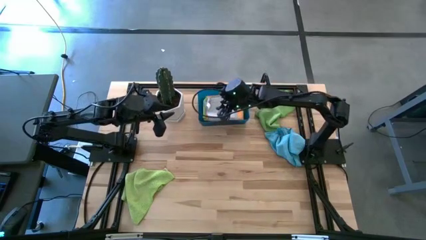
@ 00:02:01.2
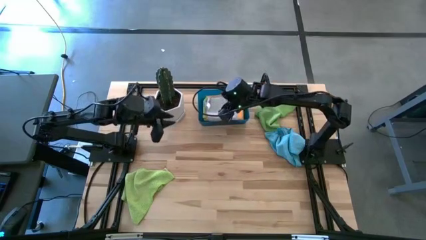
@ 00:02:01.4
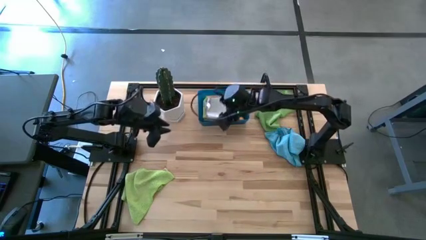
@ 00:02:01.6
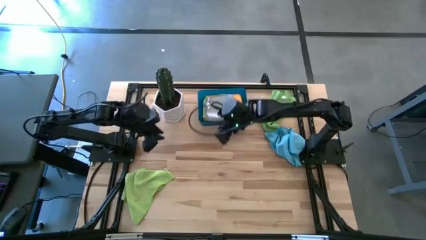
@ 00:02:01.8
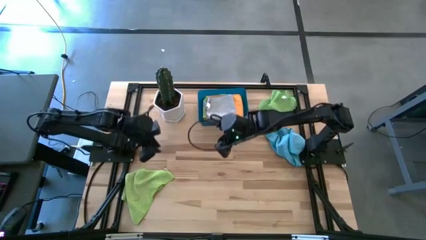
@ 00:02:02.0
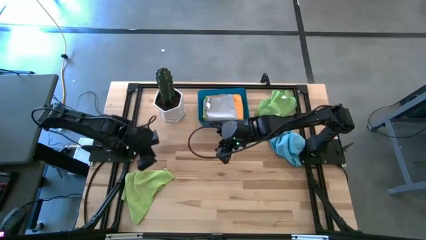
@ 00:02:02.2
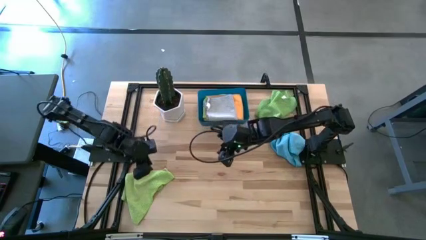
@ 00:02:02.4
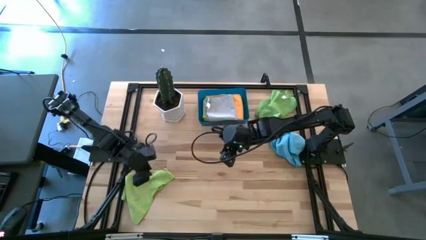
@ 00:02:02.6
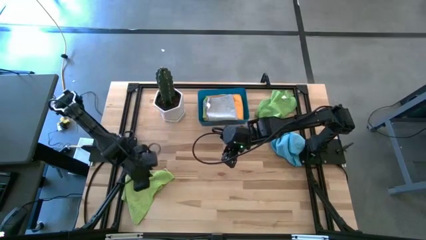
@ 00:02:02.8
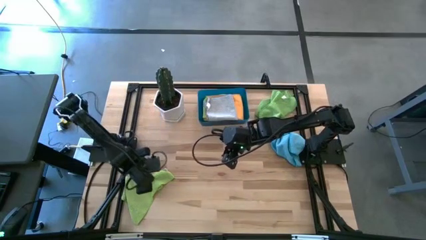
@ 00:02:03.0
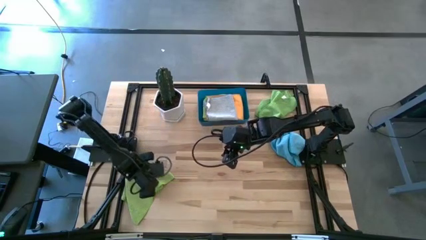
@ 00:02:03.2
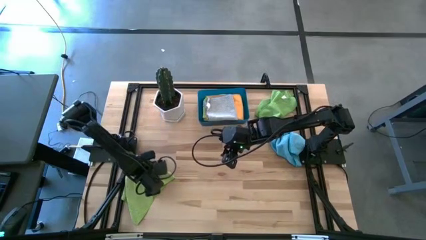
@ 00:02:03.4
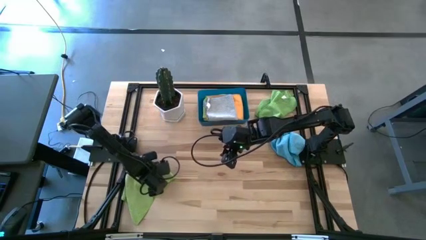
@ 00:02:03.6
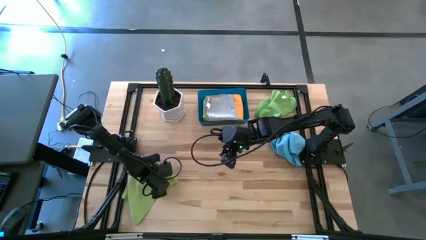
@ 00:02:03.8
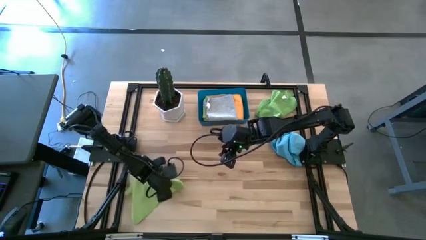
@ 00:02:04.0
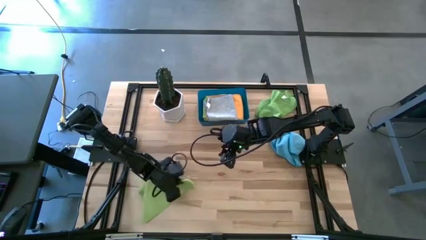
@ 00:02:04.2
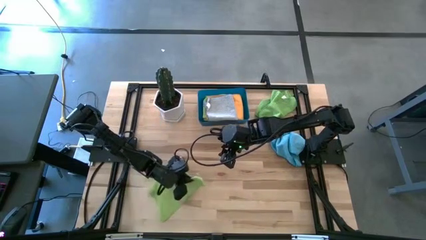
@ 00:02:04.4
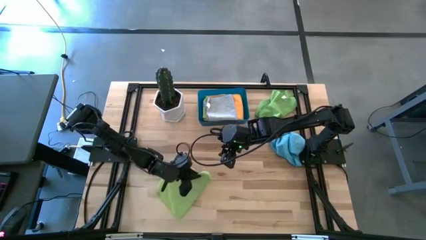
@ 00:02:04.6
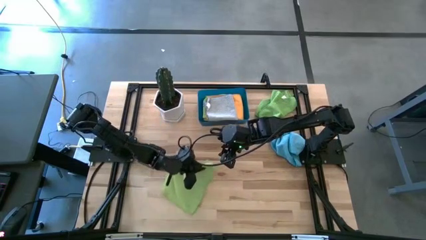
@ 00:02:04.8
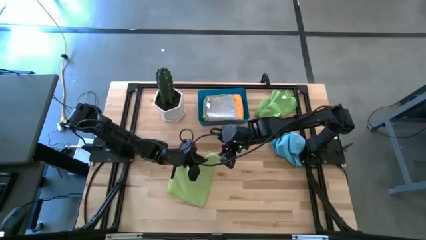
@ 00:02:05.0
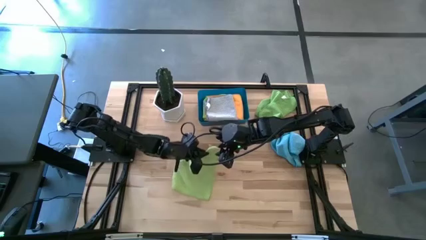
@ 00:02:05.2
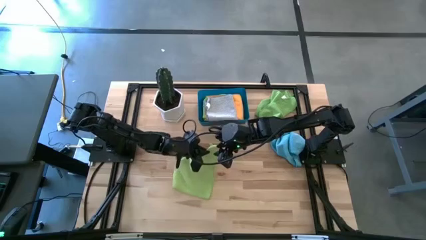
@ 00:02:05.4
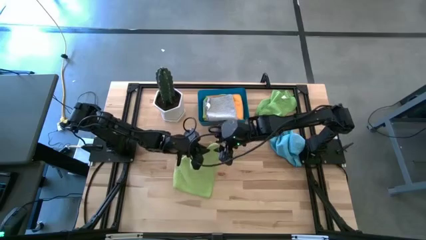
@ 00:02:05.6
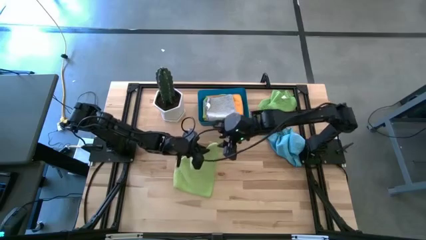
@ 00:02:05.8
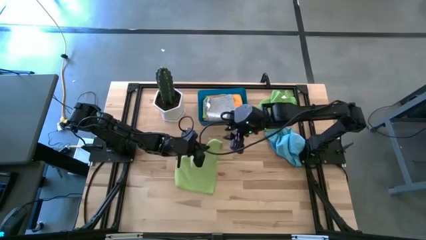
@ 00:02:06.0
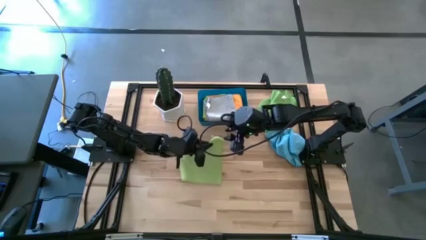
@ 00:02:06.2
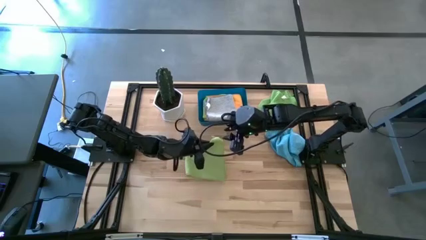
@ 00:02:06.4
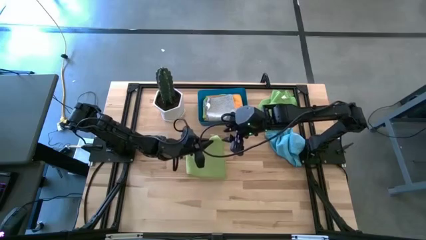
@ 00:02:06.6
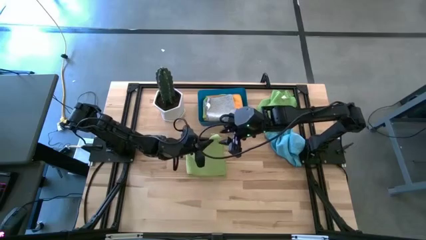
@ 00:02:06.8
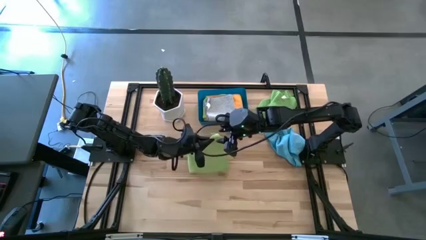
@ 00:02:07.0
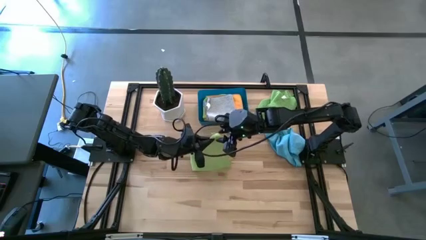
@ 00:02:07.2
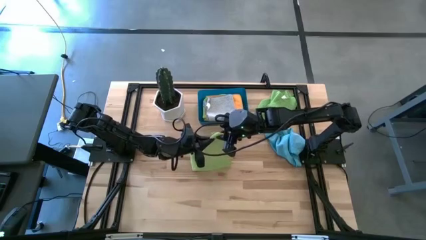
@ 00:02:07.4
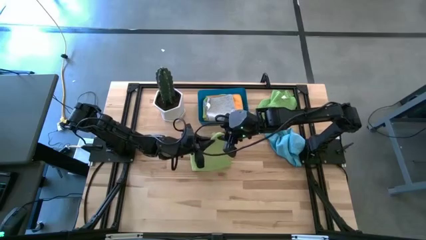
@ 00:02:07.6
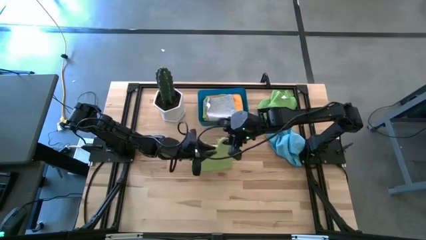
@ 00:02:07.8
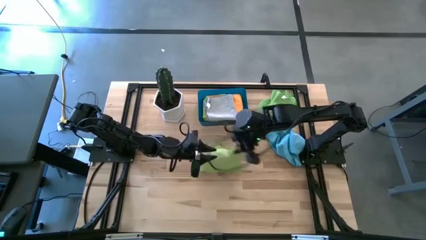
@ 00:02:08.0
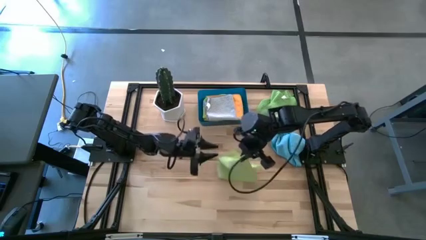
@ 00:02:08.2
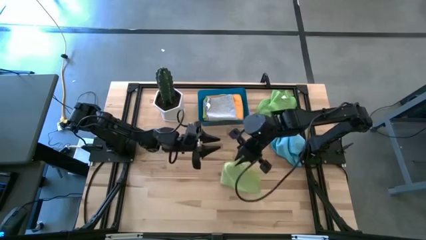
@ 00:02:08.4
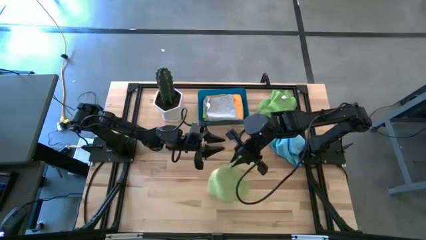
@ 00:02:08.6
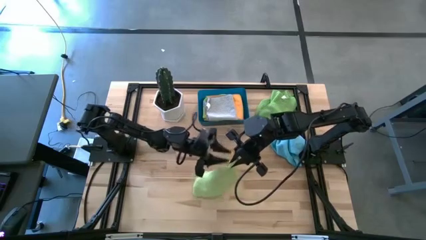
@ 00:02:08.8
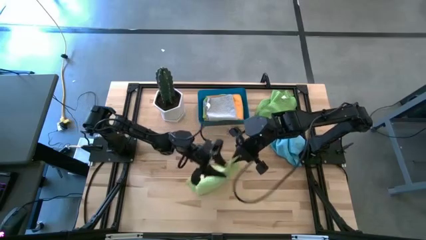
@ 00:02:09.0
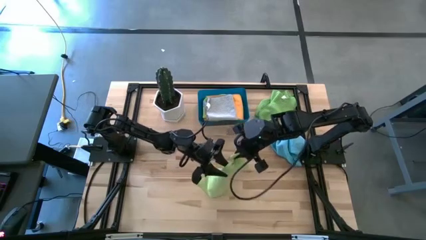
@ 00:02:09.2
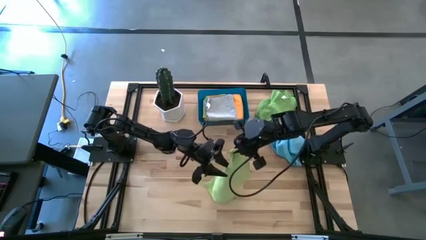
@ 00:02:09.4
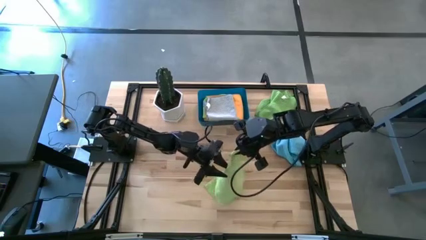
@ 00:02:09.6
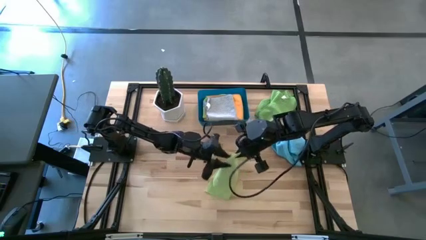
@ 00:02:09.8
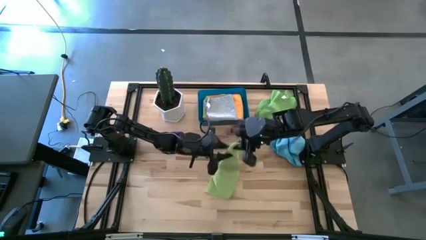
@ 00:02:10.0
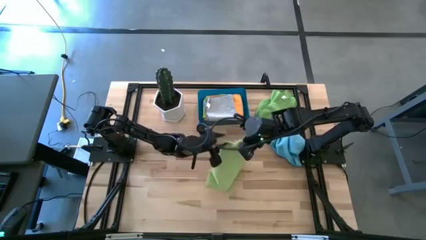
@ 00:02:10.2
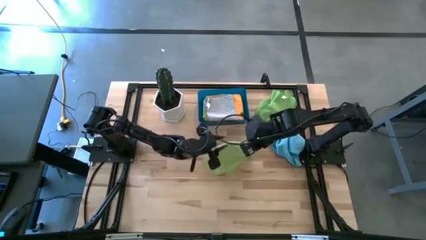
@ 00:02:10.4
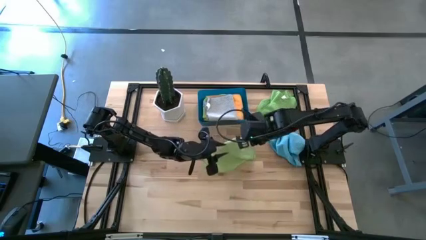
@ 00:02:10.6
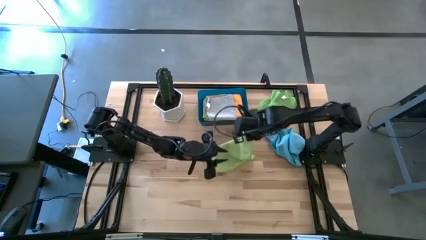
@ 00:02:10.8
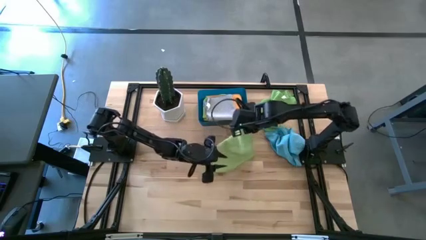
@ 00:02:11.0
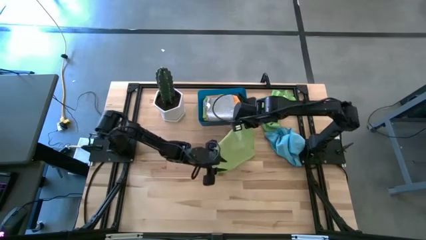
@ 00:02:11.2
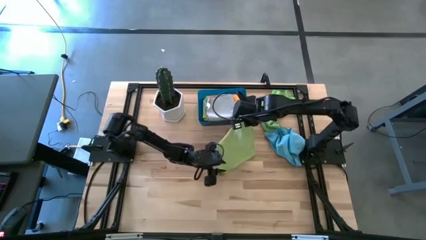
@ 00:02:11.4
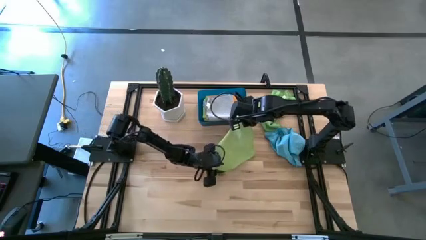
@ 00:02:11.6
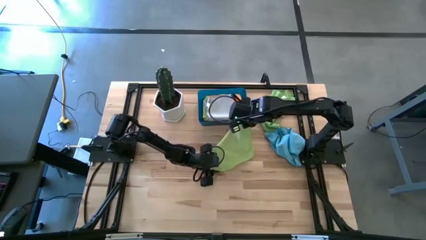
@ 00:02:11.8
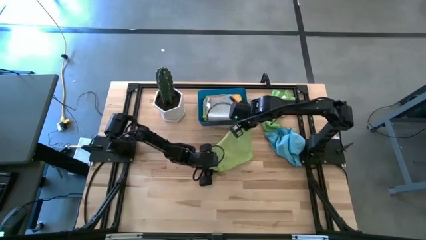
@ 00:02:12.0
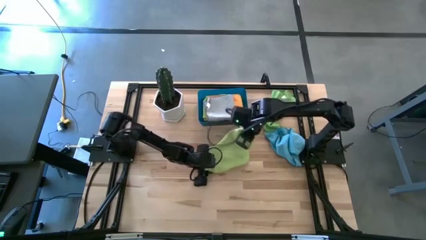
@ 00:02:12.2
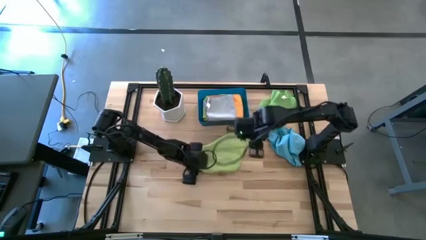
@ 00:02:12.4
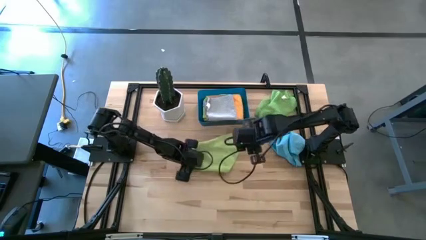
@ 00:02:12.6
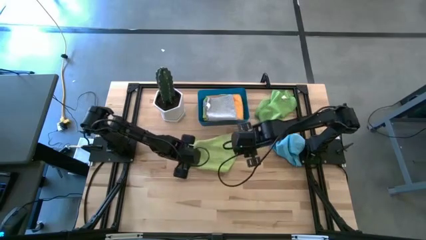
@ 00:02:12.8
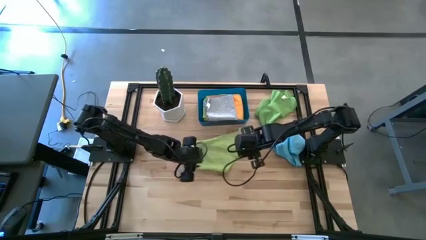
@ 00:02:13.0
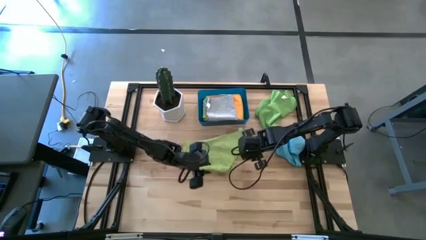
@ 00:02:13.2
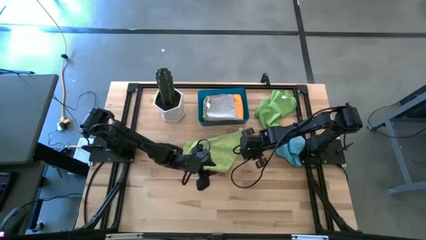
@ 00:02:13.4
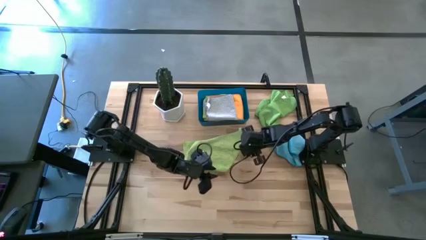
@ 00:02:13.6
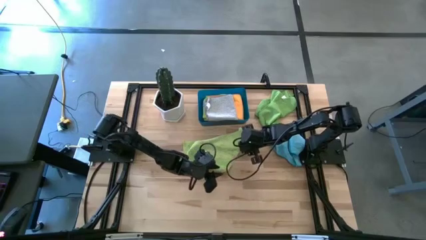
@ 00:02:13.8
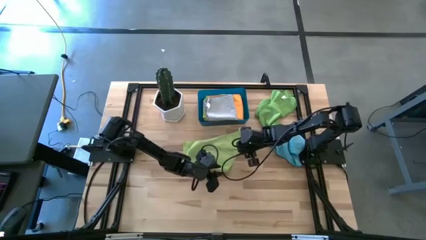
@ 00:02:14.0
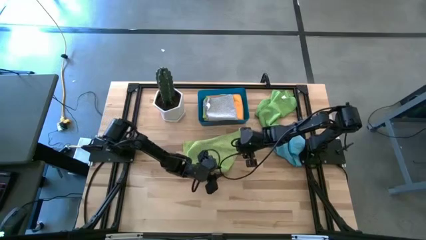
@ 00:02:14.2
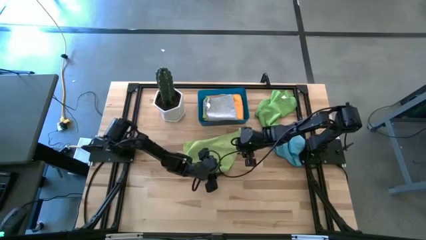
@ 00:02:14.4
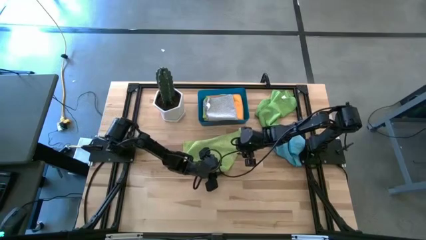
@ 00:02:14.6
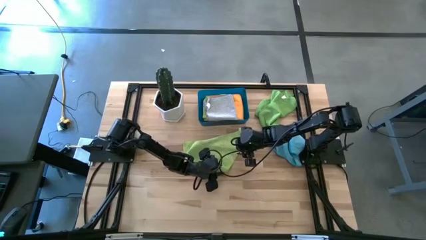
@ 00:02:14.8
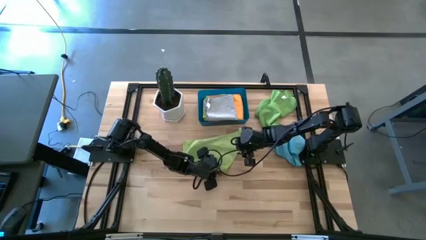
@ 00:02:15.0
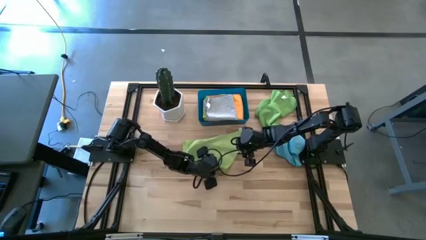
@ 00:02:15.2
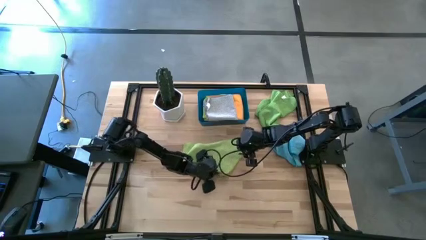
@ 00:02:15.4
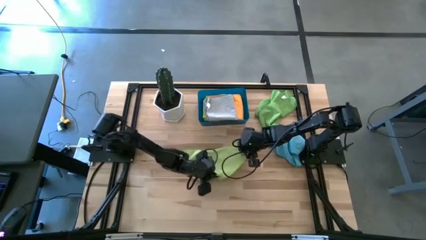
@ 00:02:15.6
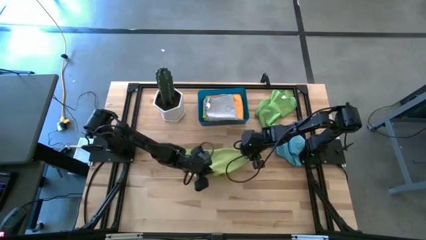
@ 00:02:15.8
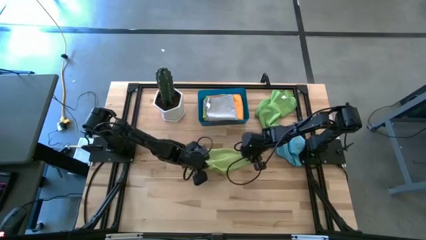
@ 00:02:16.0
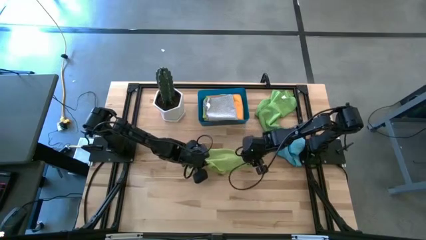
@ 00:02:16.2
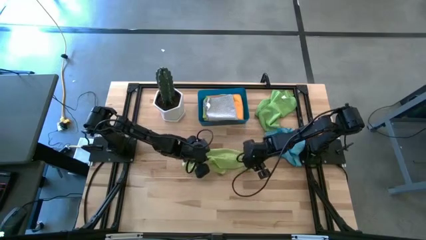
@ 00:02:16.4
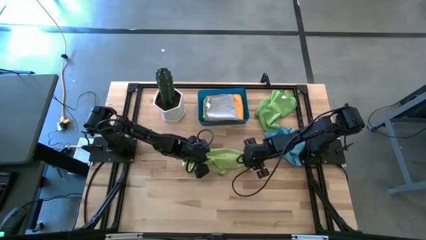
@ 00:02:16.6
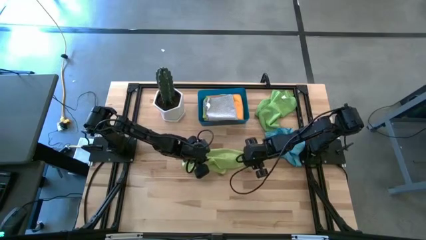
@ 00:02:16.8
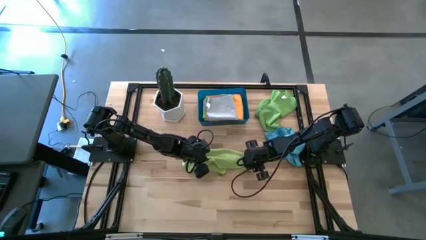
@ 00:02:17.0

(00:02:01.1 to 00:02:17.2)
Task: Fold microfiber towels
Fold the bottom green microfiber towel

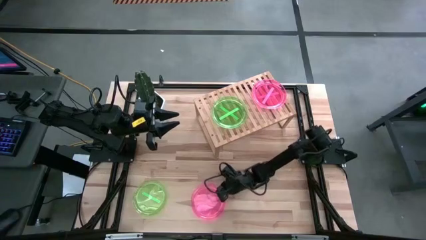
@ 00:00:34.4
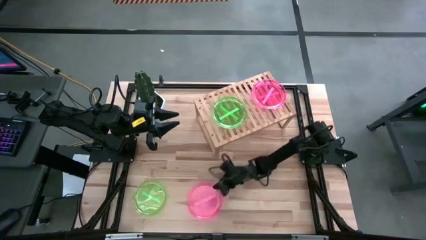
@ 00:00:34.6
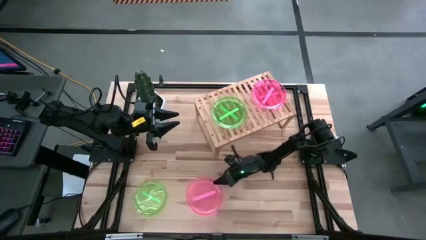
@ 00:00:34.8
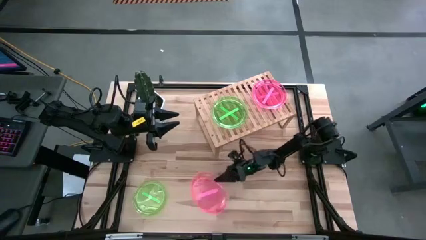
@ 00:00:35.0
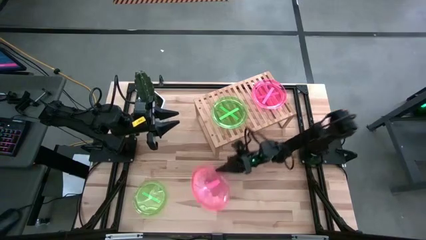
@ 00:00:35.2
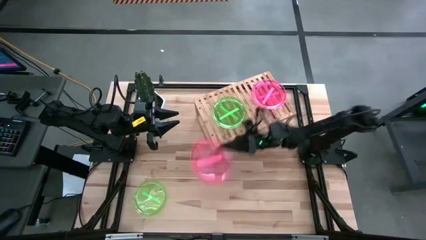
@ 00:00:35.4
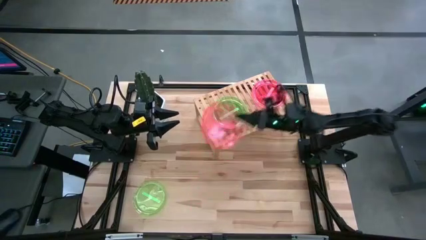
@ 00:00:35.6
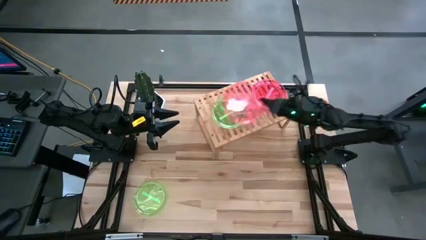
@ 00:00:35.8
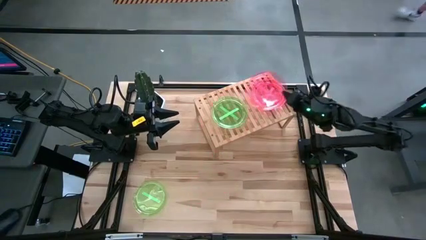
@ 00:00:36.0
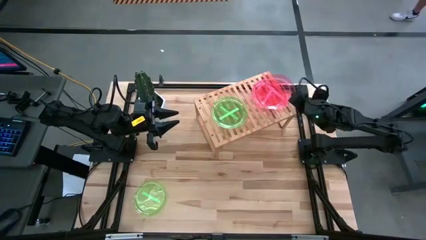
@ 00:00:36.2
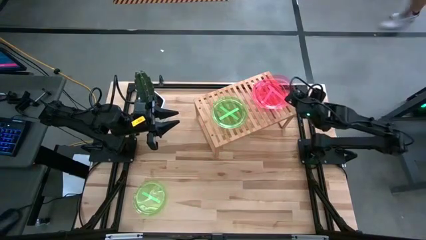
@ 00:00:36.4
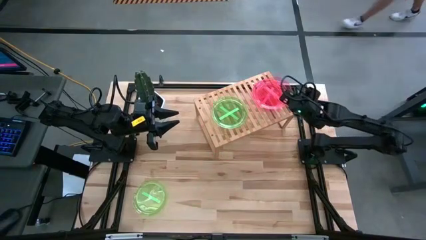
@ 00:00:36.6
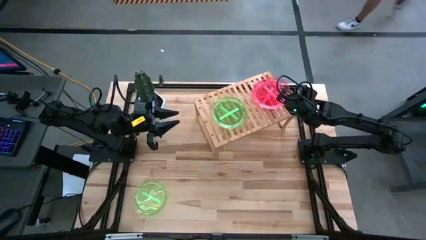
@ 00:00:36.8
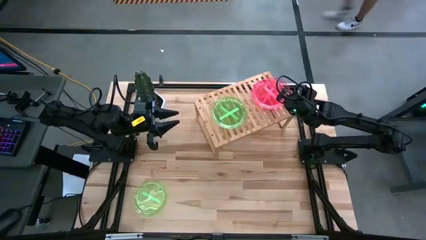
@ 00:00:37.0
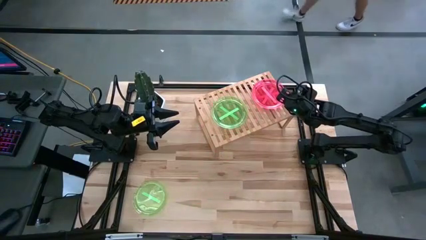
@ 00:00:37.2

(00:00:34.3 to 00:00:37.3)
Task: Place and stack plates onto a shelf
Stack the pink plate on top of the other pink plate on the shelf
